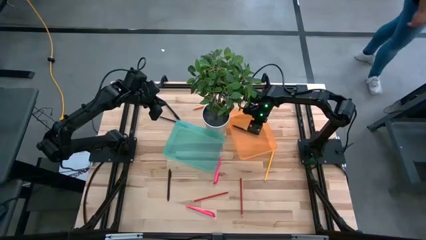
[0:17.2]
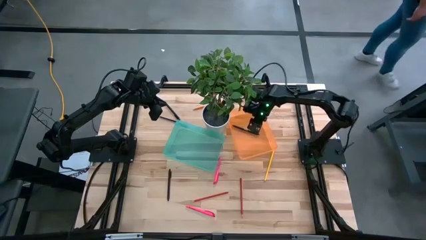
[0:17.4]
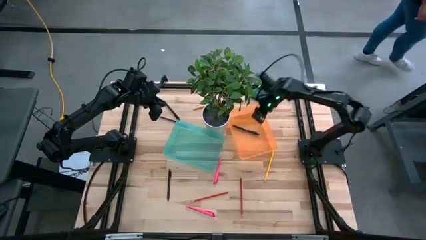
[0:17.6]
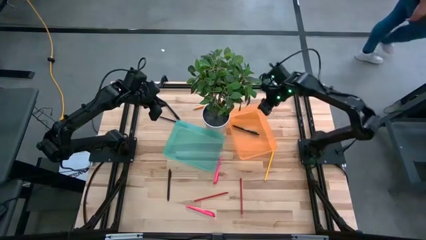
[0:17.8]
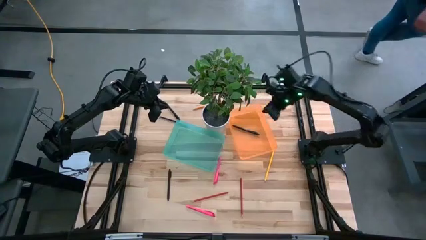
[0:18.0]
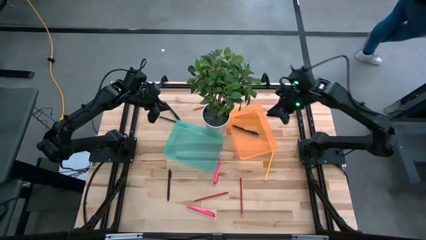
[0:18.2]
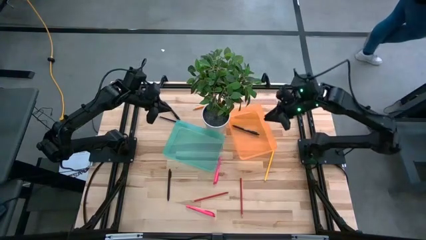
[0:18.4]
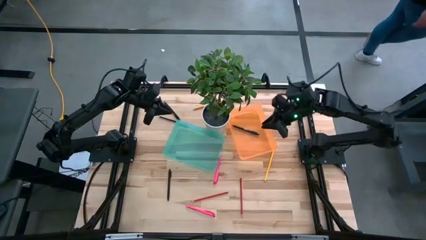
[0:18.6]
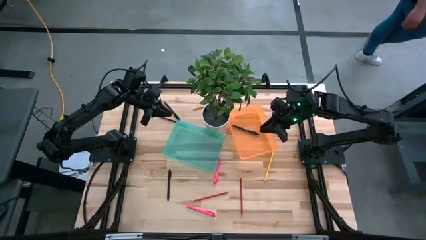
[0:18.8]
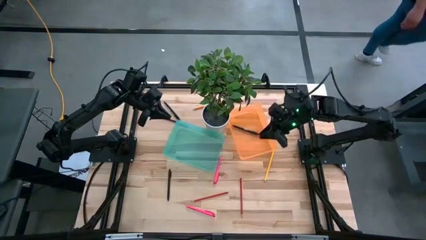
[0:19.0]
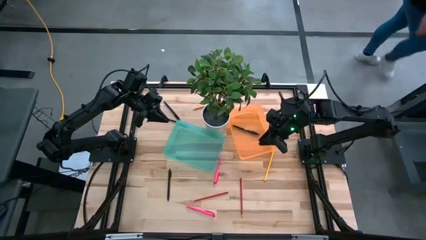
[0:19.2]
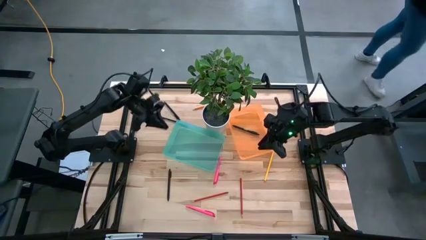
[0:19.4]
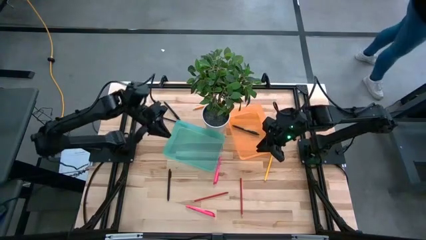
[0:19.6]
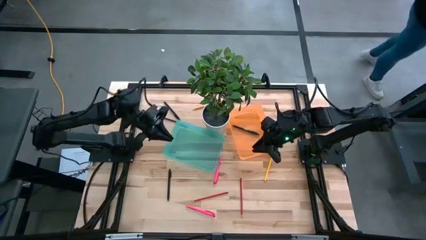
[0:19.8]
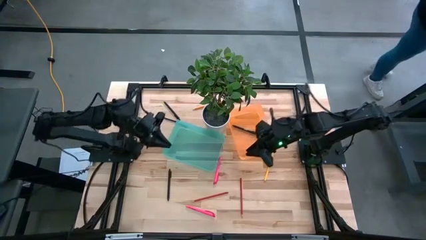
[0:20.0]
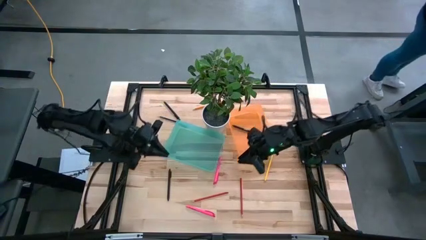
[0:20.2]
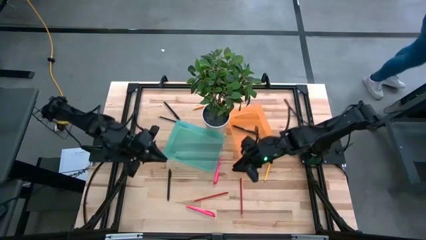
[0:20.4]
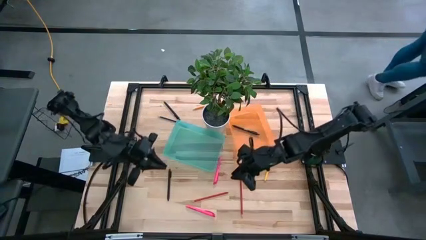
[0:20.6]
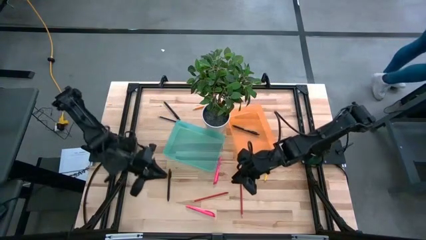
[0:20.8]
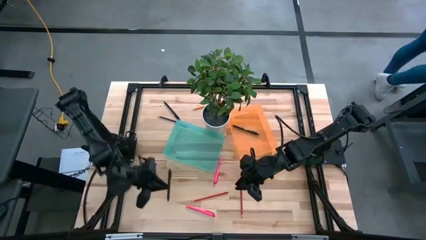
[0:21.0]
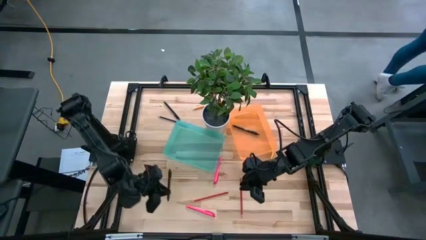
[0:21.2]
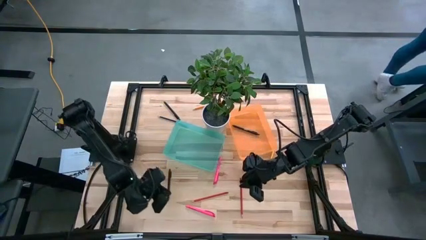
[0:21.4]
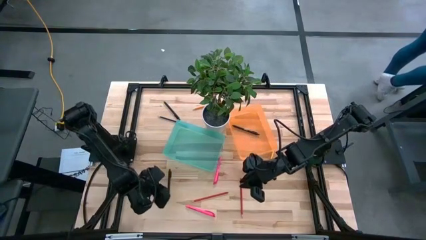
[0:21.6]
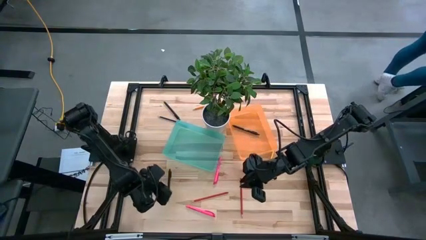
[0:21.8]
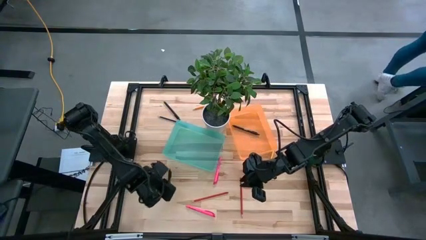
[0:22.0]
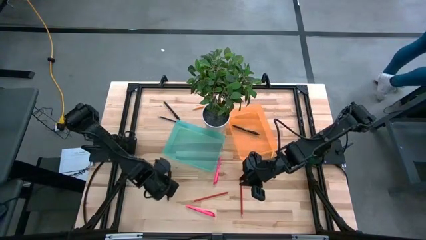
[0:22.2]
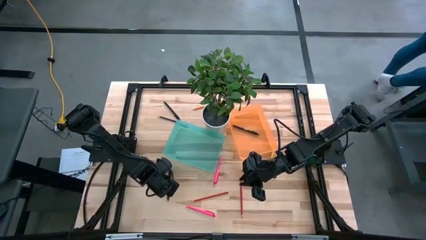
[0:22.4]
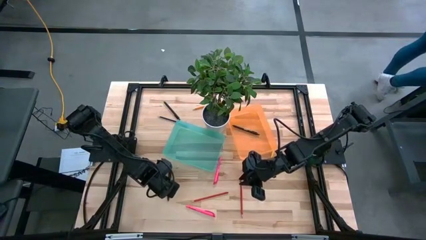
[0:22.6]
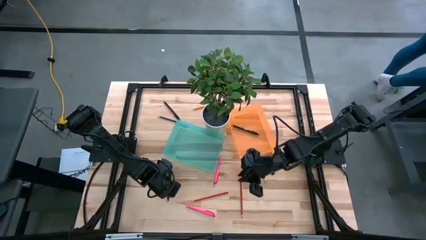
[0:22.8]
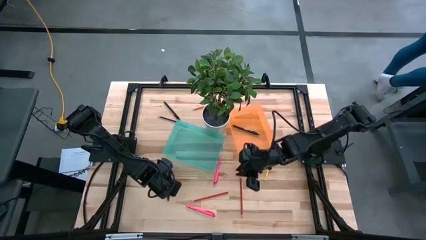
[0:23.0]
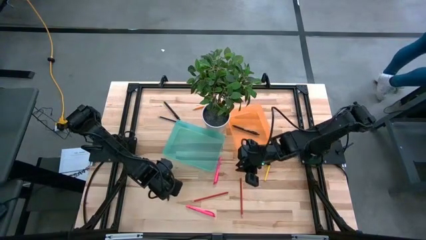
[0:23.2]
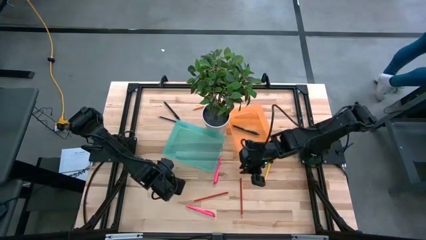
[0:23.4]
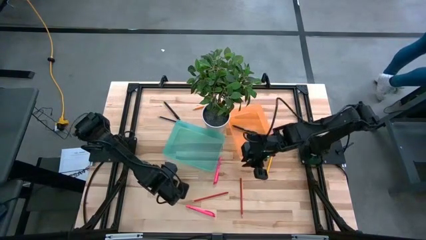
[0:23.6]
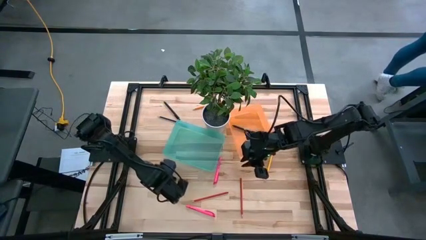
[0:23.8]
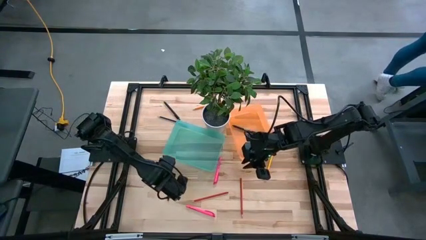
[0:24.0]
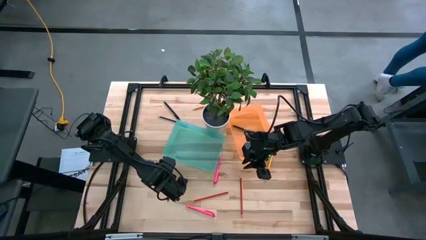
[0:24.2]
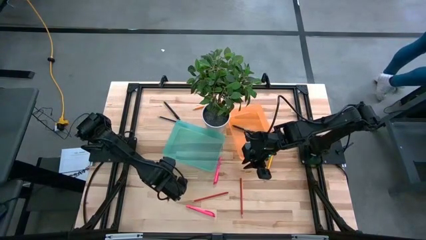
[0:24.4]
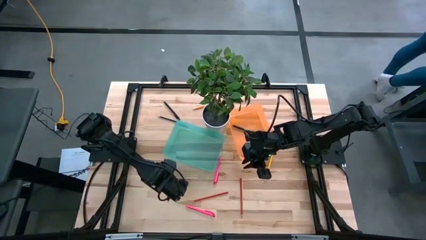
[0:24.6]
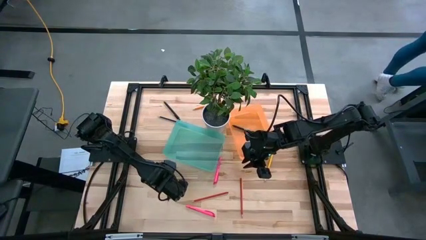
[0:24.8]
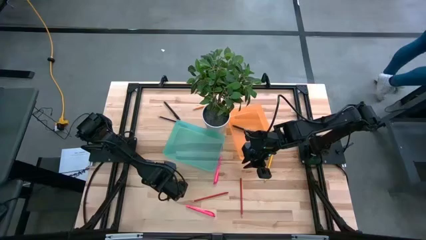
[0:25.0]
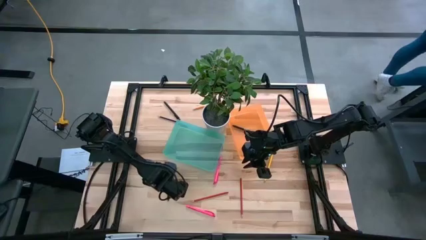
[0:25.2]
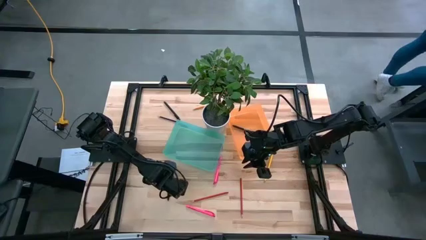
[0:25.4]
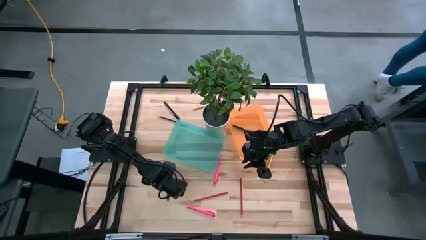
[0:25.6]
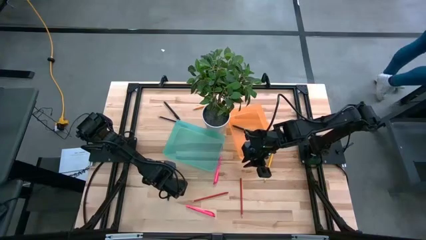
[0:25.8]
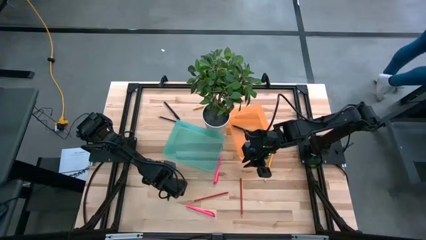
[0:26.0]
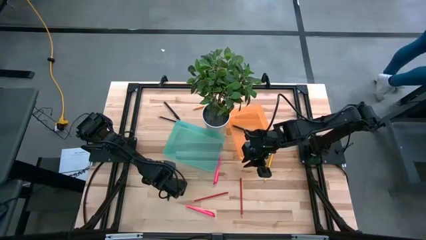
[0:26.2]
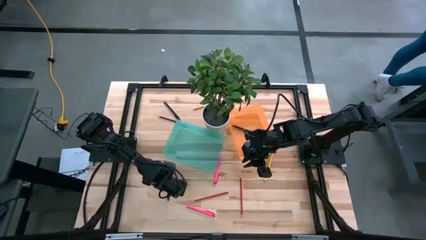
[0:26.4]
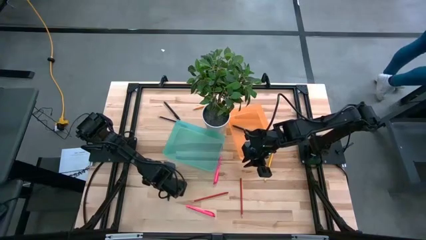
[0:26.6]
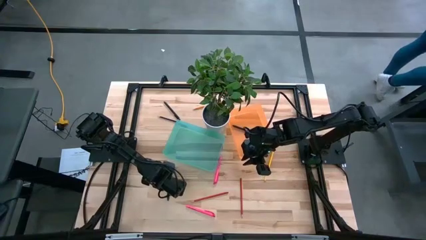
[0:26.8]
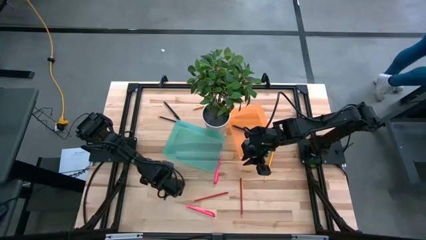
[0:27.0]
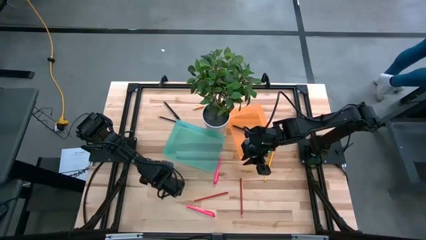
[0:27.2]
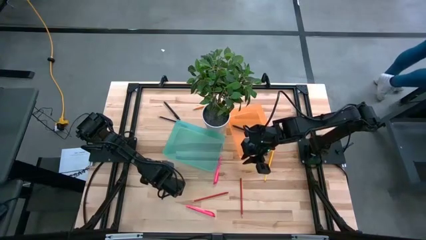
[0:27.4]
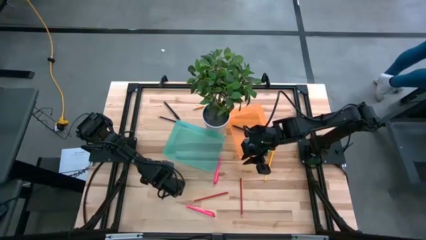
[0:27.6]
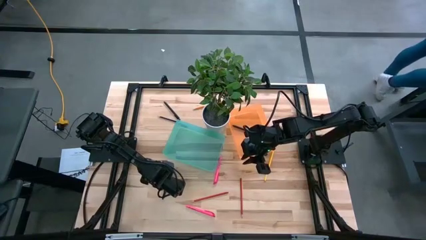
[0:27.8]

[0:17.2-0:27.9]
Task: Sort pens & pencils
Put the bottom black pen into the orange bin
